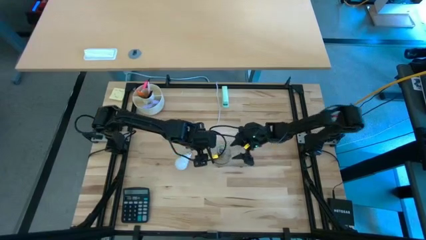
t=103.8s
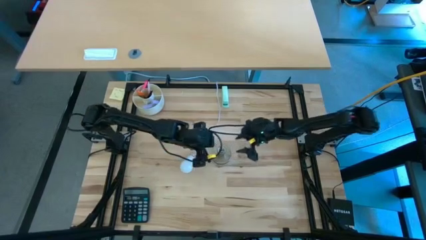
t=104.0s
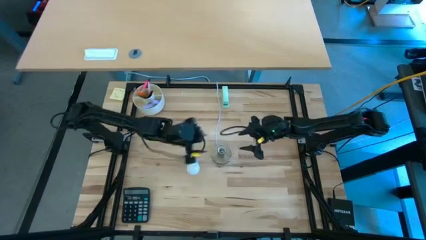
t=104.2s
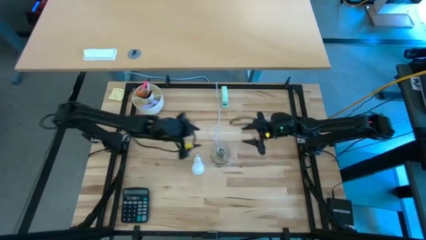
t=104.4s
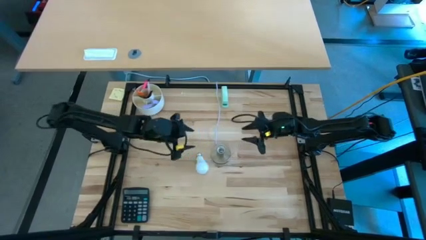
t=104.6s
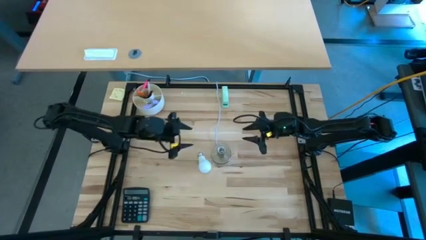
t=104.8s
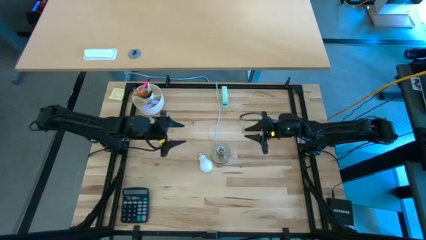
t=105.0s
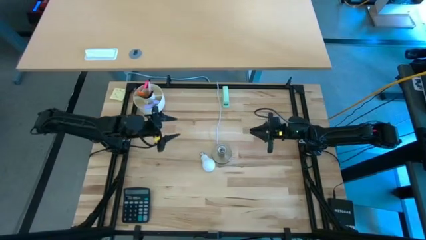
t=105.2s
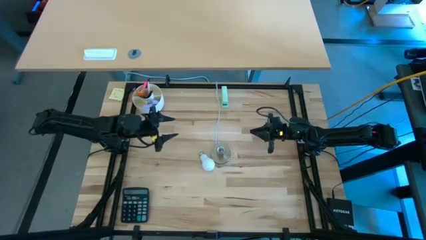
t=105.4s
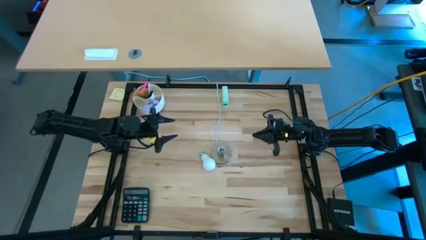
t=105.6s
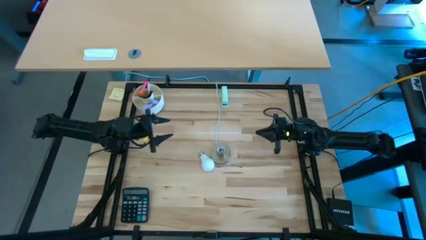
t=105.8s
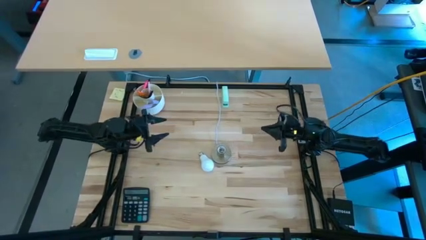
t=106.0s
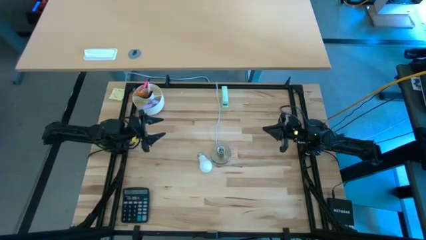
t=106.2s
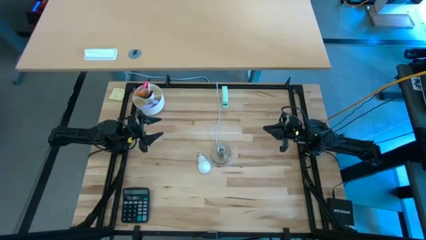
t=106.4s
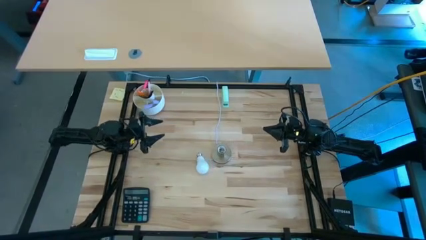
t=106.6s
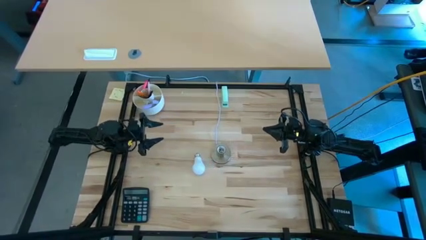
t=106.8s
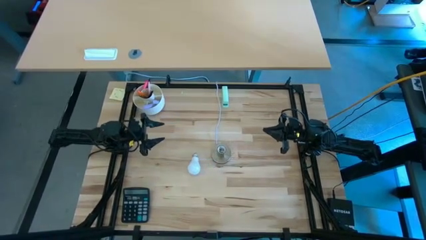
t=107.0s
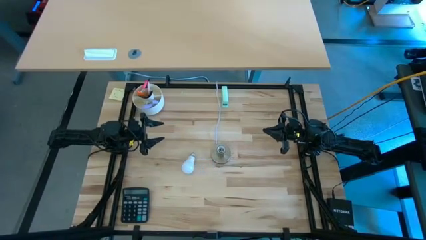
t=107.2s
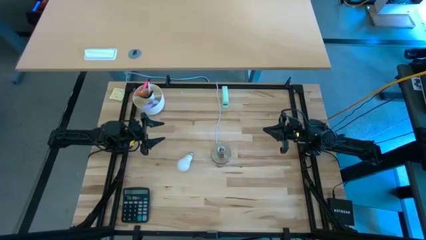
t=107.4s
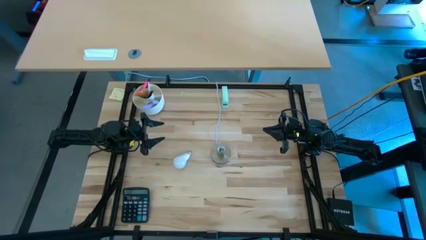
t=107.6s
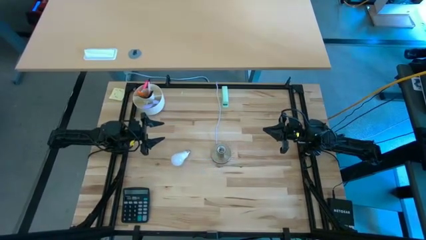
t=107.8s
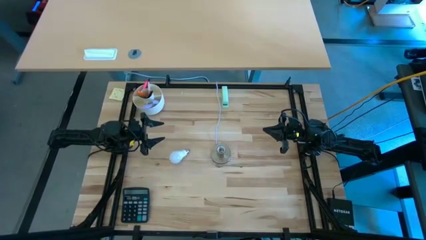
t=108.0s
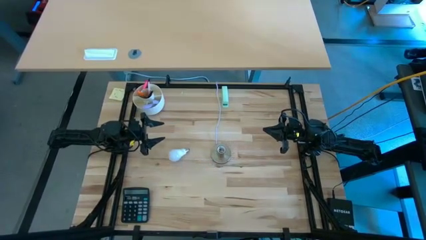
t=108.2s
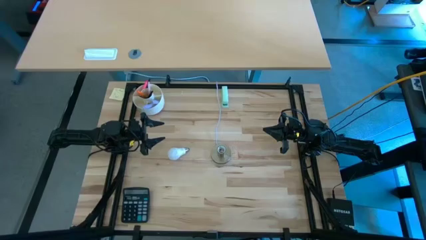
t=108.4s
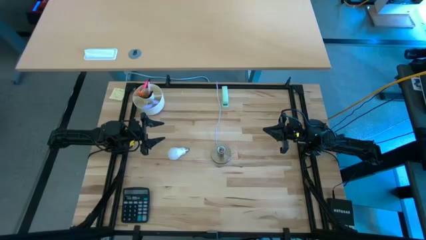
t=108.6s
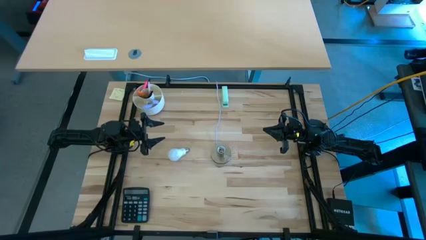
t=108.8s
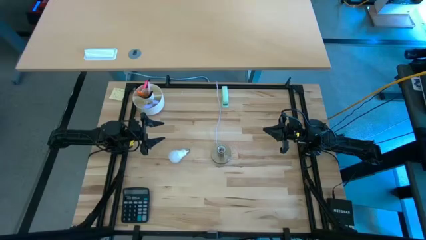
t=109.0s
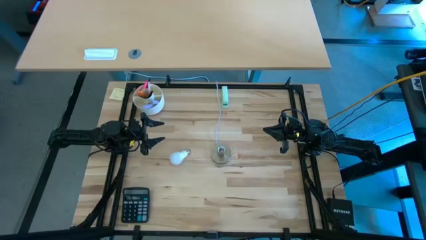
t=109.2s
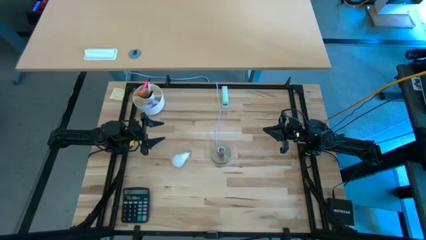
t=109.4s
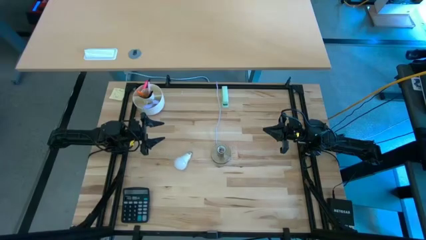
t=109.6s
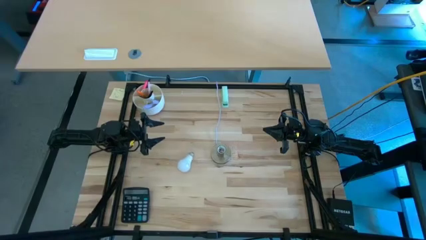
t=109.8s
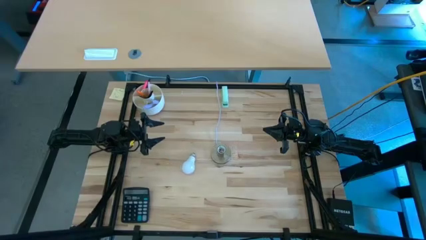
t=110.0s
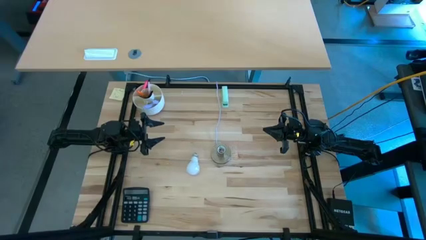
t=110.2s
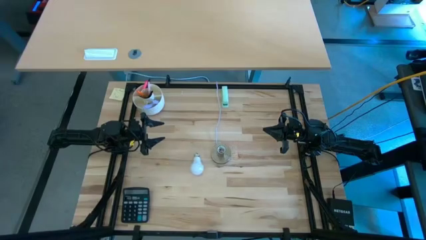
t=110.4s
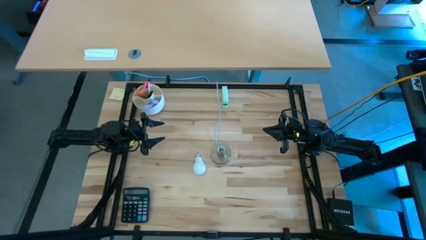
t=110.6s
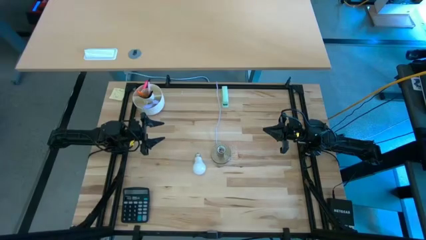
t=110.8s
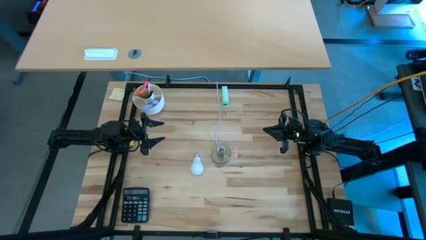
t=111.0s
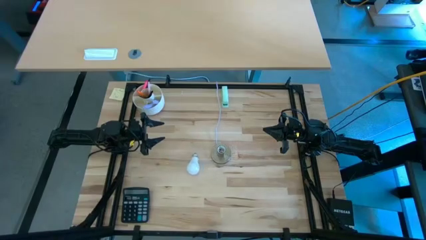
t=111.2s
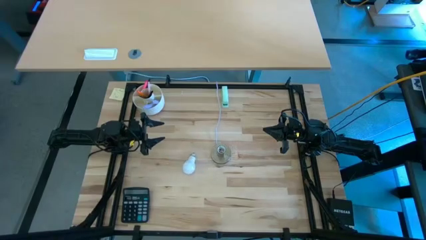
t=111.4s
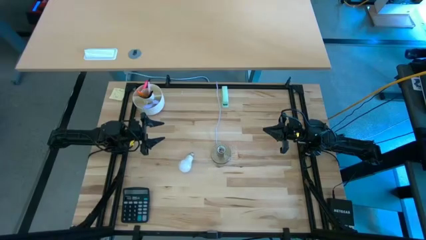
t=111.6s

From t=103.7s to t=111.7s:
Task: Screw lightbulb
Return to Home Position

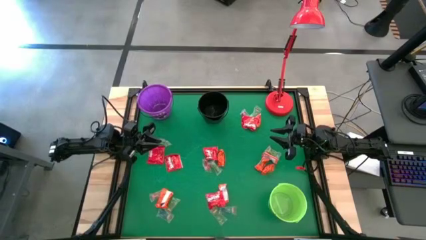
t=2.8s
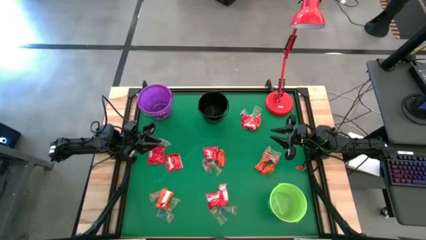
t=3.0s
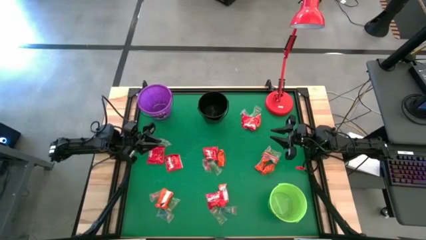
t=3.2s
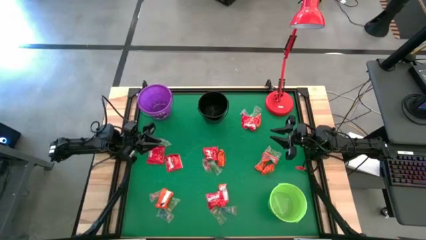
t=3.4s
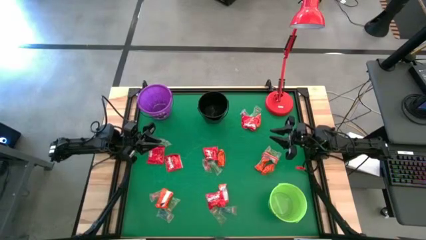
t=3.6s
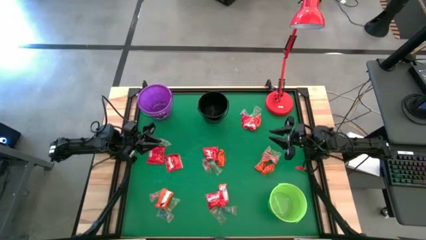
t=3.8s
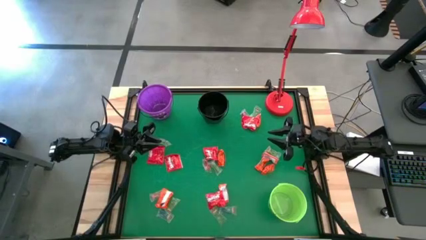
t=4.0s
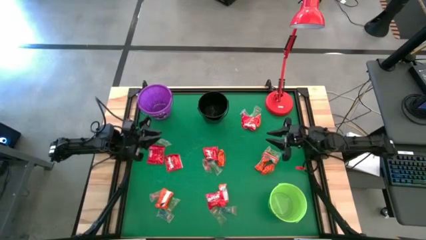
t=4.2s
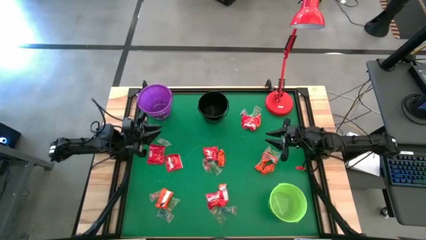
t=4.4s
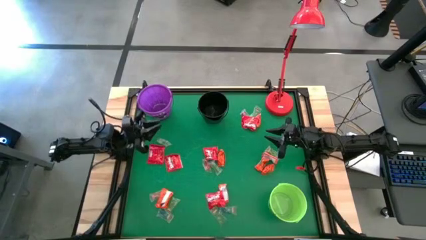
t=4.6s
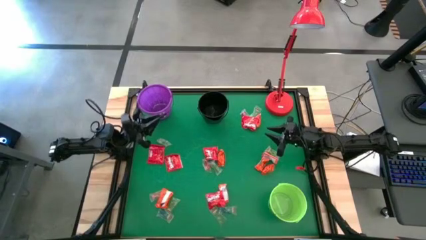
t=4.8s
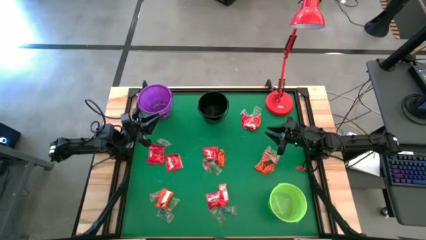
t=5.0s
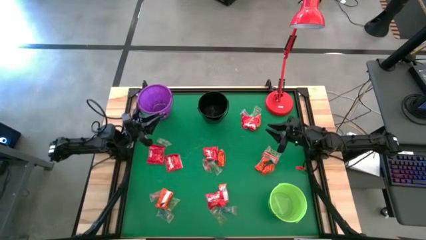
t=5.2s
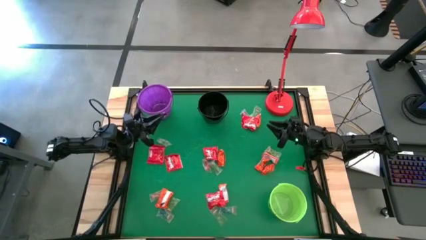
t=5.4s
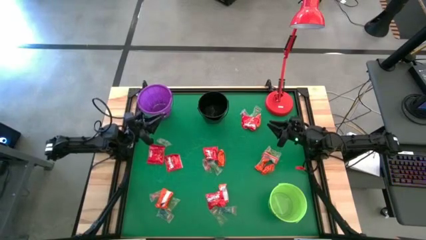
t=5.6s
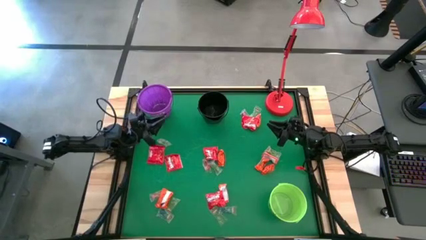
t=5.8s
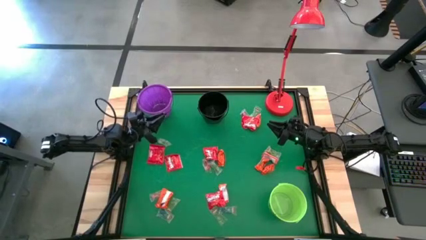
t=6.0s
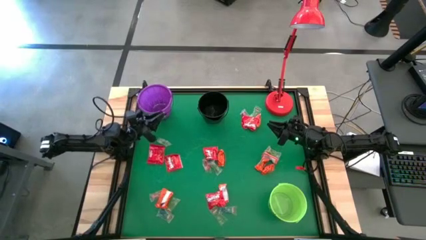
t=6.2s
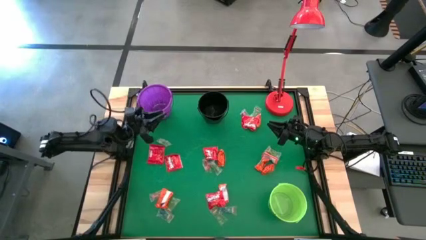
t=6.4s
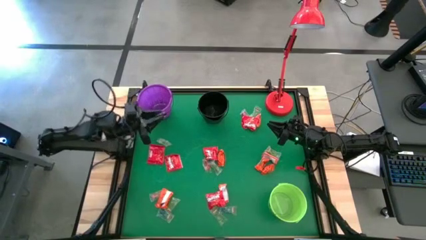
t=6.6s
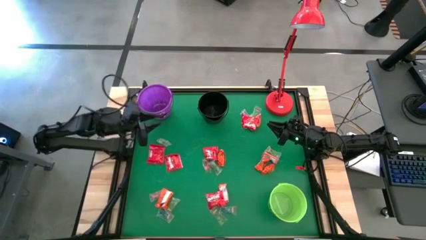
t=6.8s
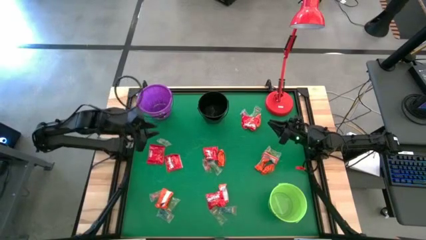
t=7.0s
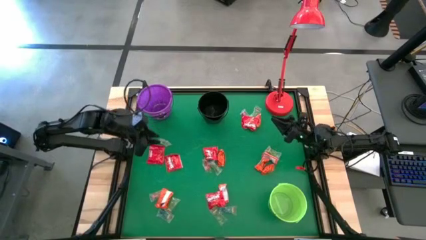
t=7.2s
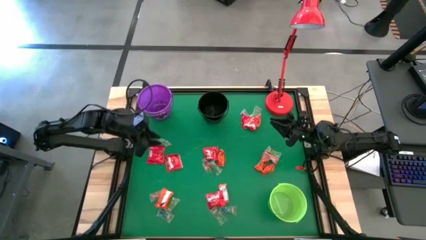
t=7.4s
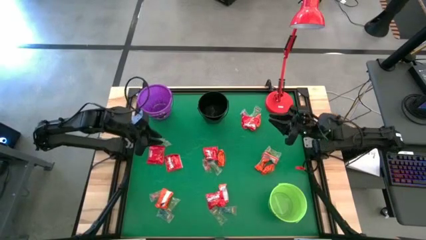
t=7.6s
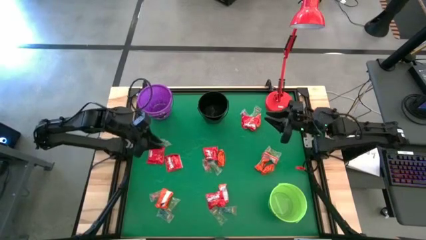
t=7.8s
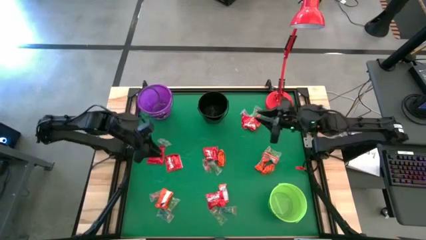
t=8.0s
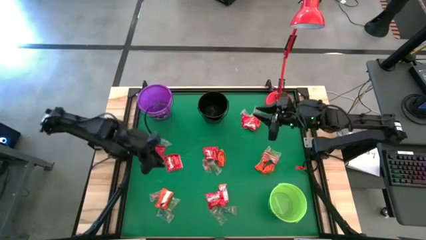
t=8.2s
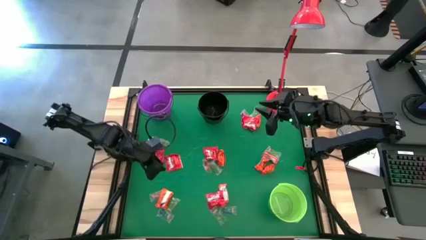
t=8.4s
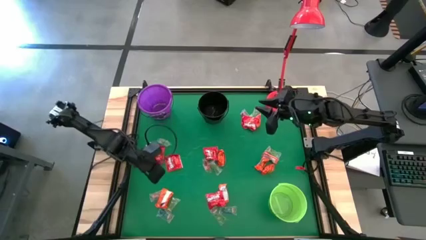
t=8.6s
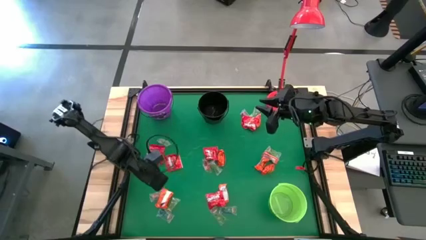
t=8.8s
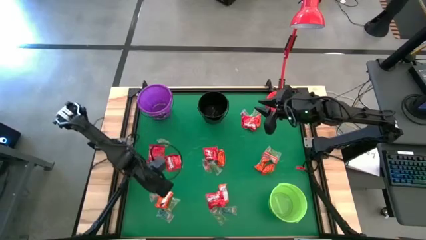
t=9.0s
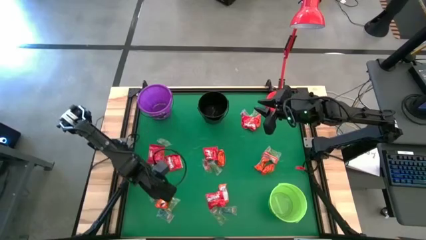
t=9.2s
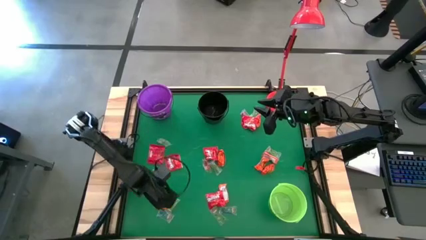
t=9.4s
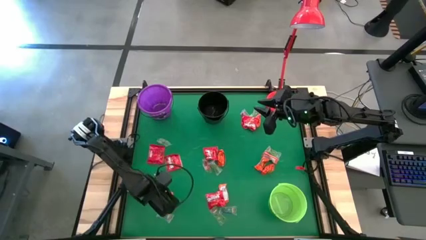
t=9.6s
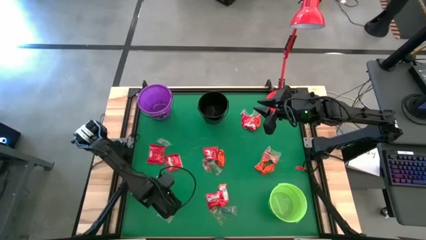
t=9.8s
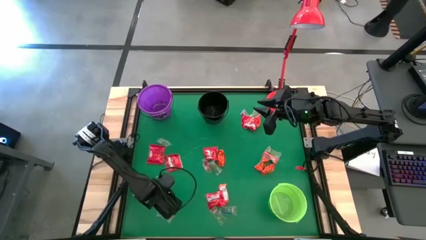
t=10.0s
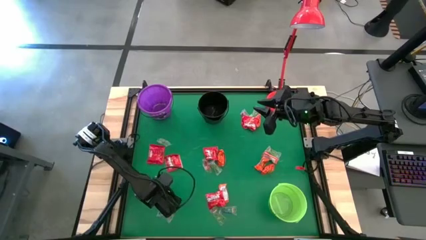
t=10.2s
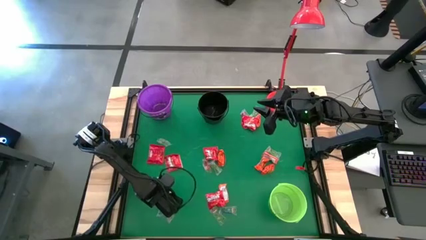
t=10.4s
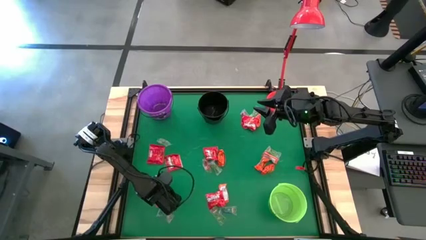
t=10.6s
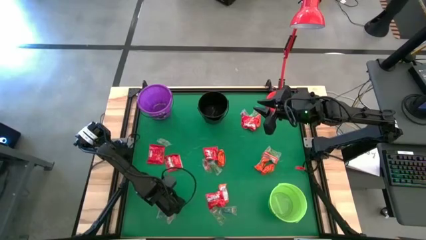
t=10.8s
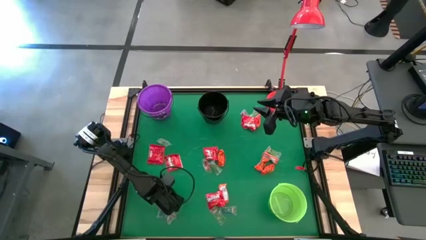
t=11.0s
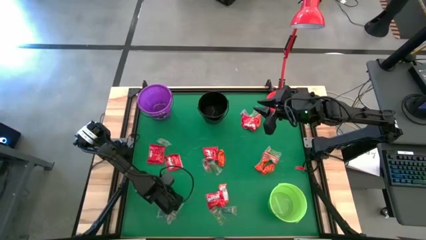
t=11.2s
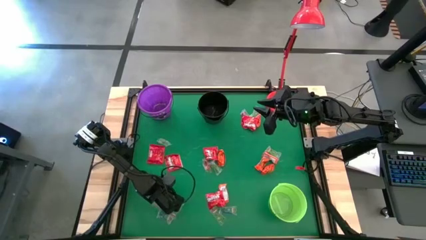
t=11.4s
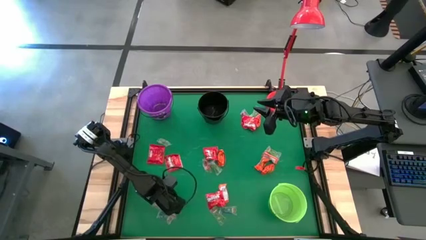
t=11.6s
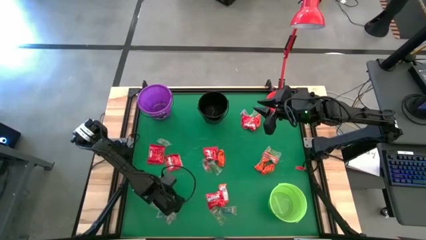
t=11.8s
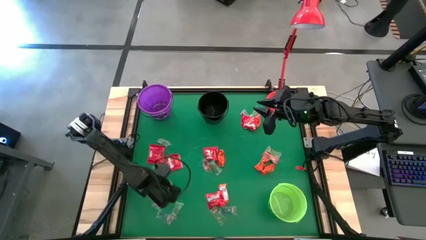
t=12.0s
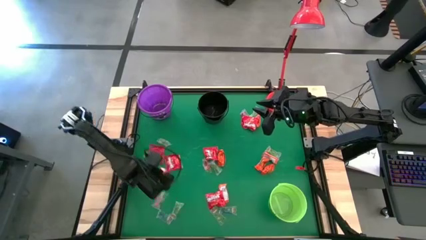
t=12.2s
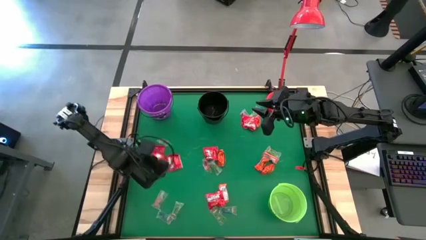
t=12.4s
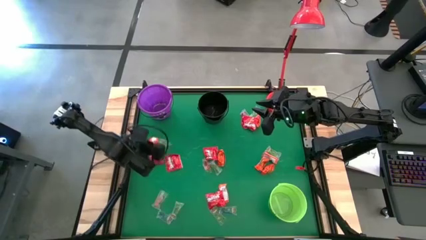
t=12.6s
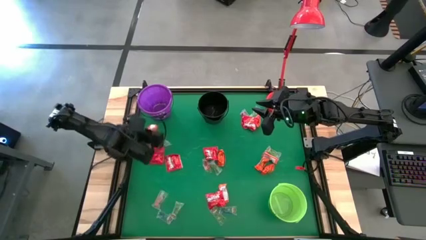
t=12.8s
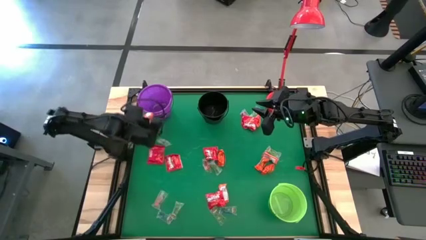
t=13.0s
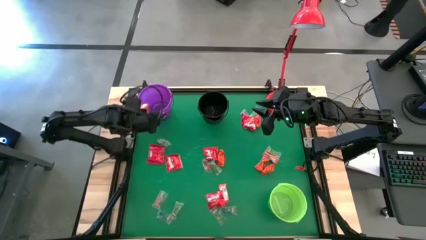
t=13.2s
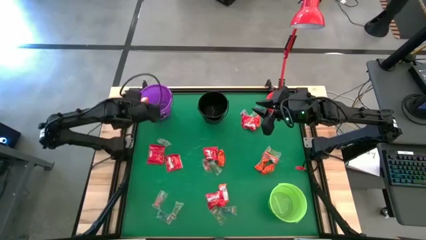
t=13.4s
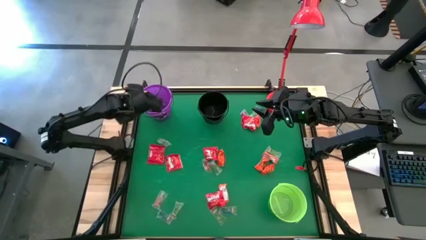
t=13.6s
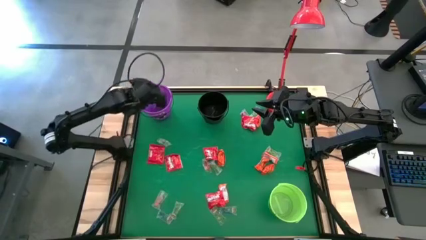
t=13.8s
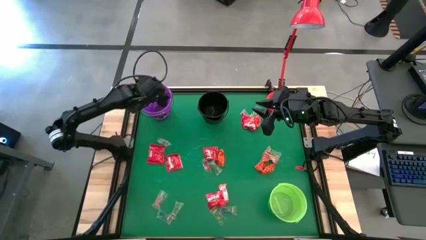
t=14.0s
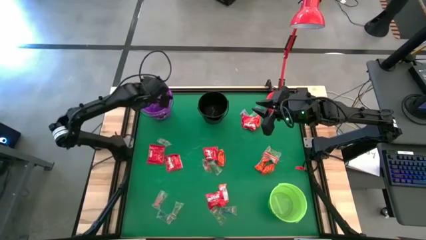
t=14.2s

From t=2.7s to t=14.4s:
Task: Sort candy
Put the orange chocolate bar into the purple bucket
